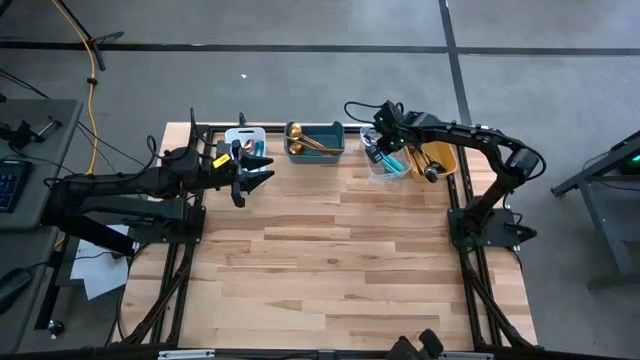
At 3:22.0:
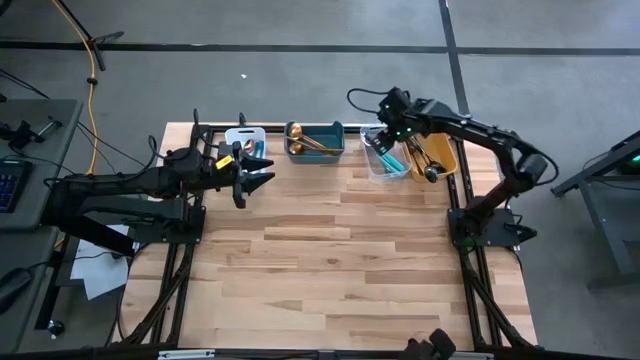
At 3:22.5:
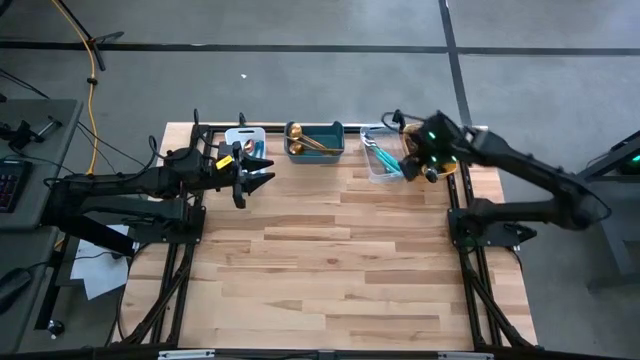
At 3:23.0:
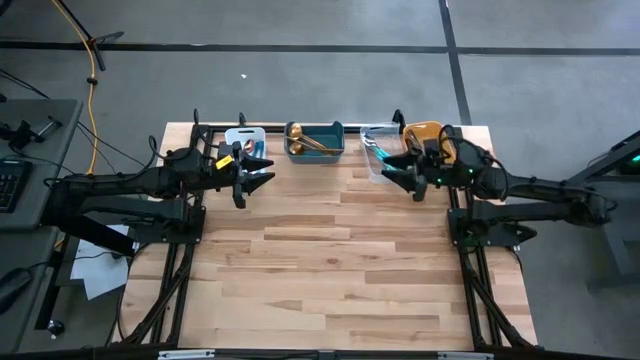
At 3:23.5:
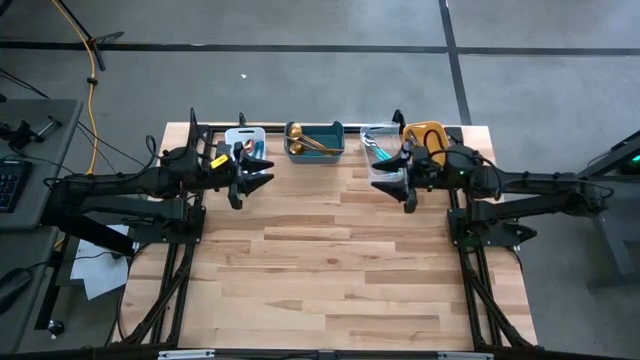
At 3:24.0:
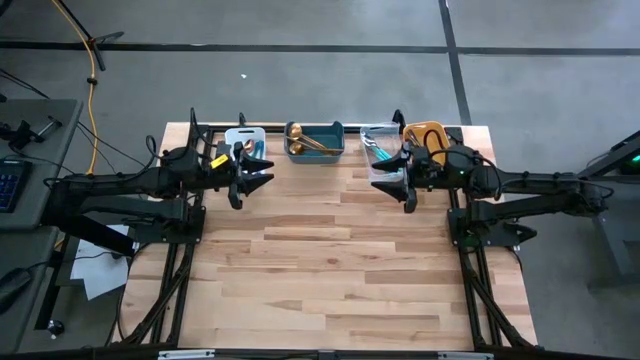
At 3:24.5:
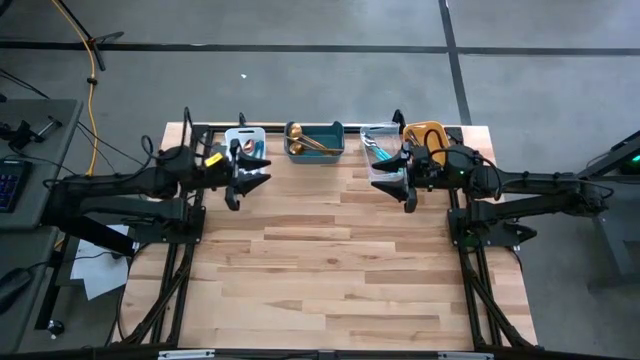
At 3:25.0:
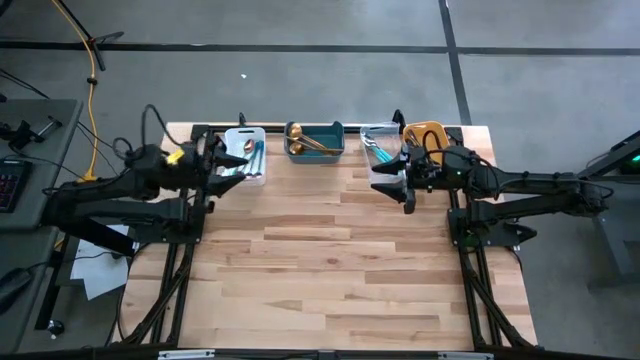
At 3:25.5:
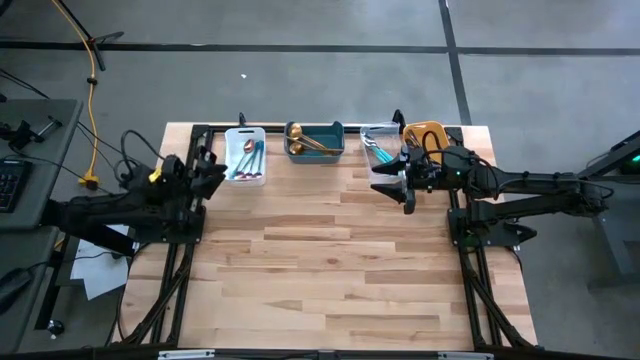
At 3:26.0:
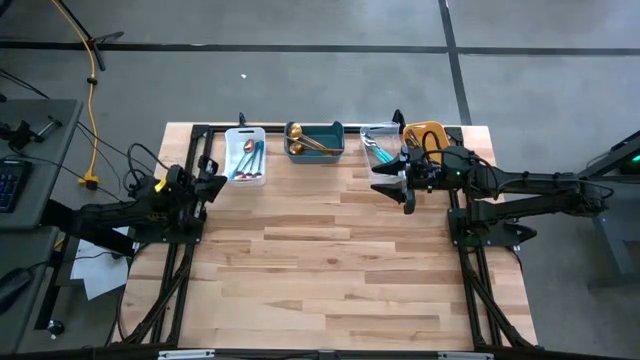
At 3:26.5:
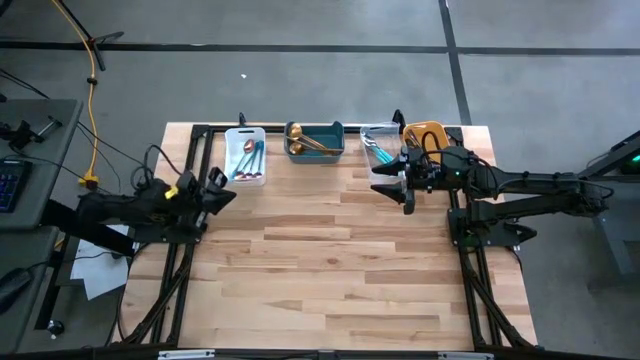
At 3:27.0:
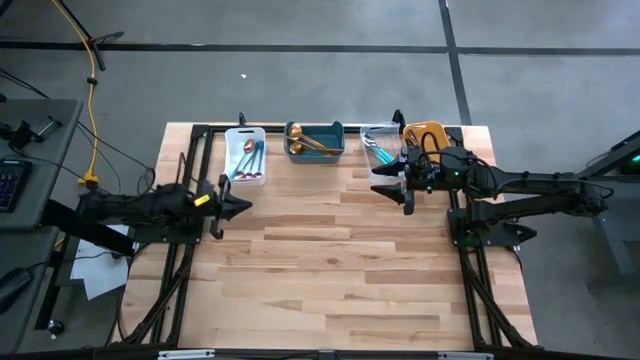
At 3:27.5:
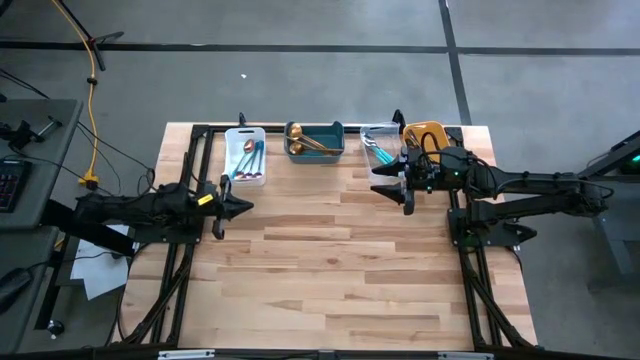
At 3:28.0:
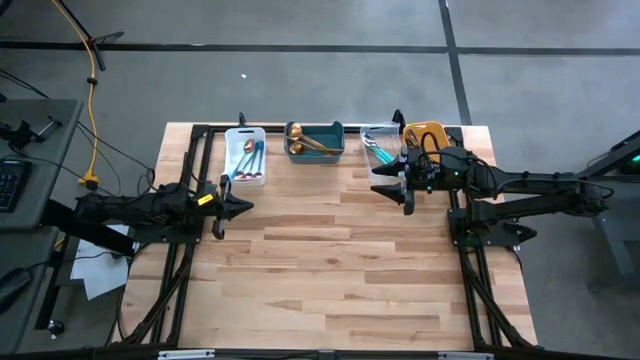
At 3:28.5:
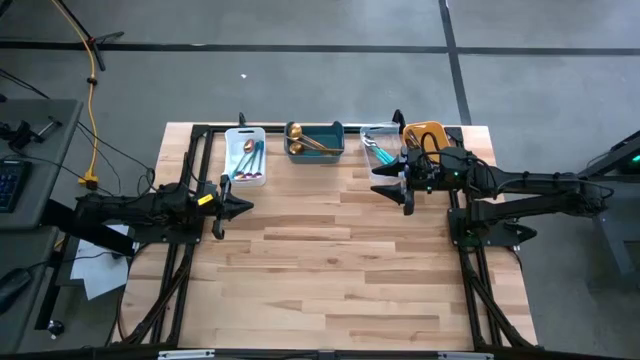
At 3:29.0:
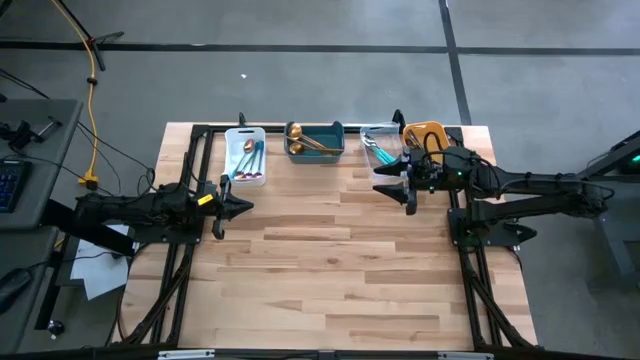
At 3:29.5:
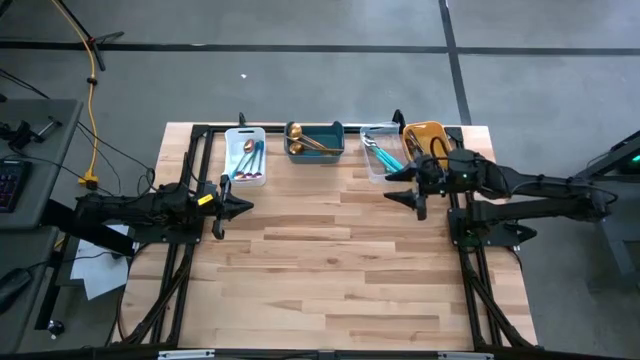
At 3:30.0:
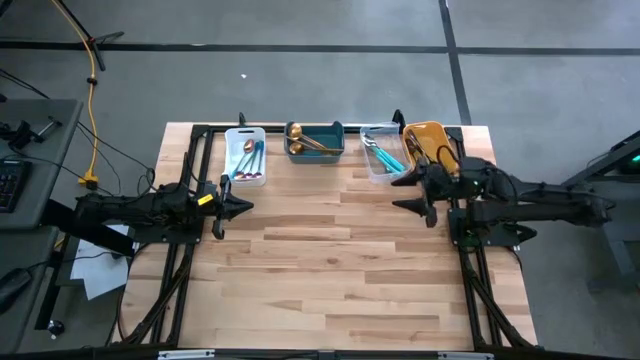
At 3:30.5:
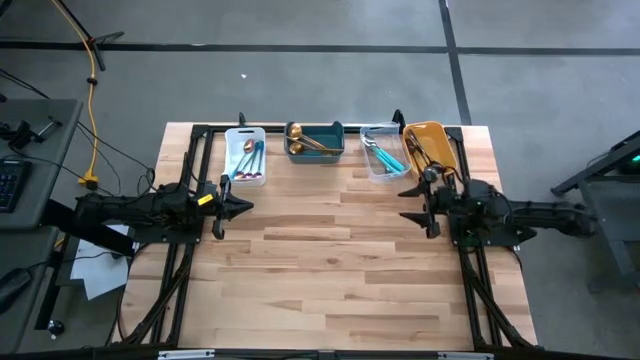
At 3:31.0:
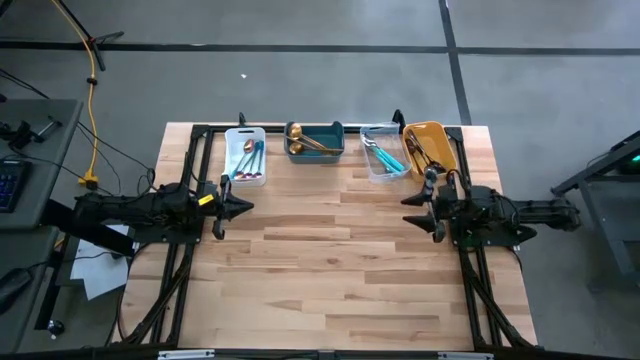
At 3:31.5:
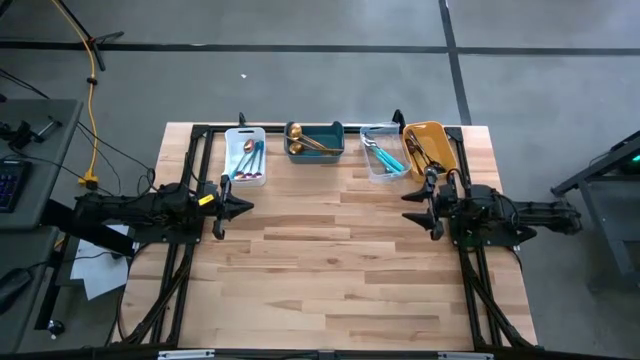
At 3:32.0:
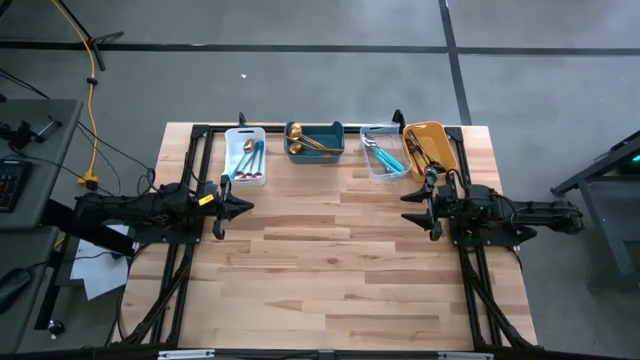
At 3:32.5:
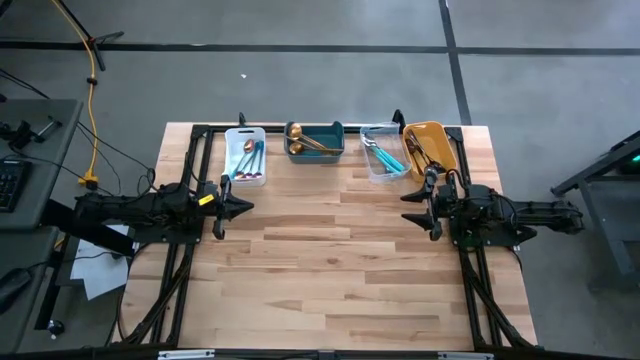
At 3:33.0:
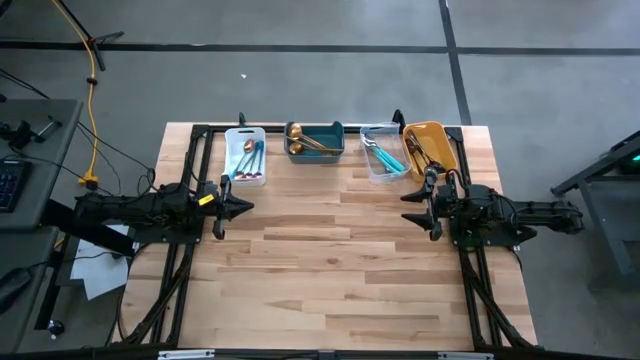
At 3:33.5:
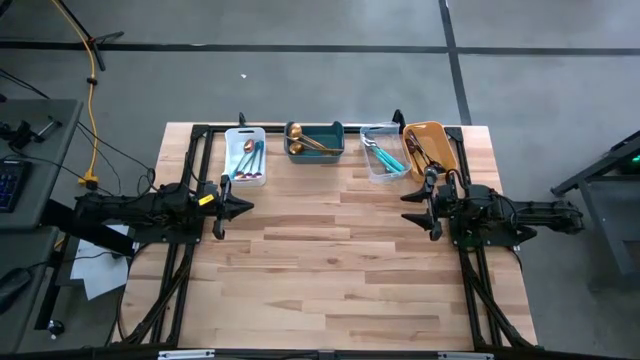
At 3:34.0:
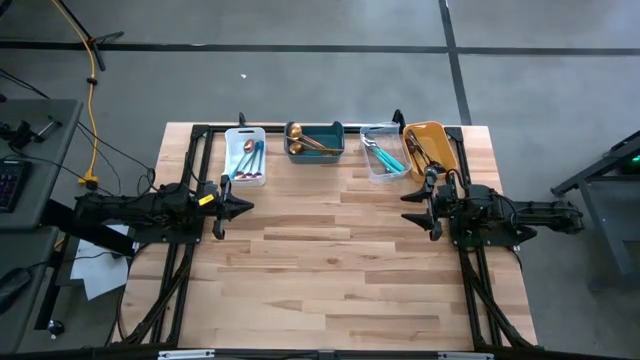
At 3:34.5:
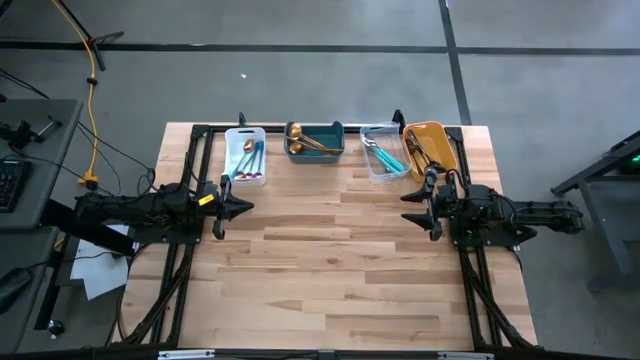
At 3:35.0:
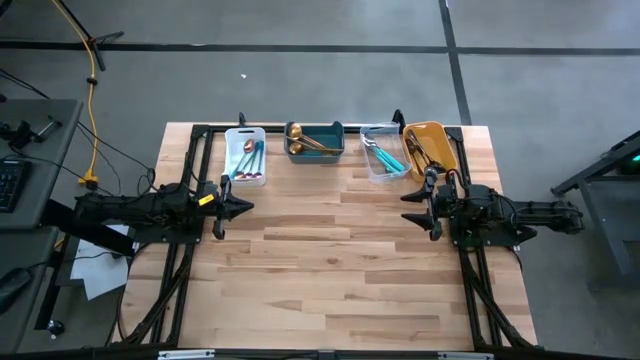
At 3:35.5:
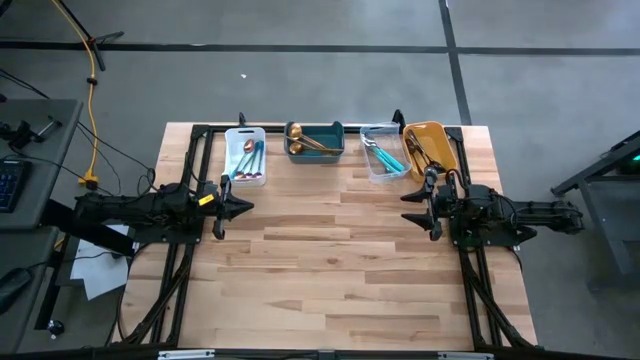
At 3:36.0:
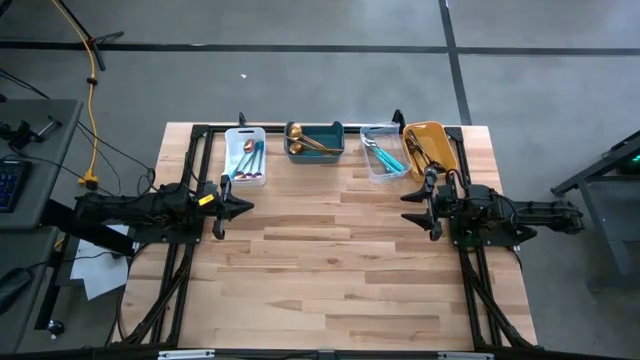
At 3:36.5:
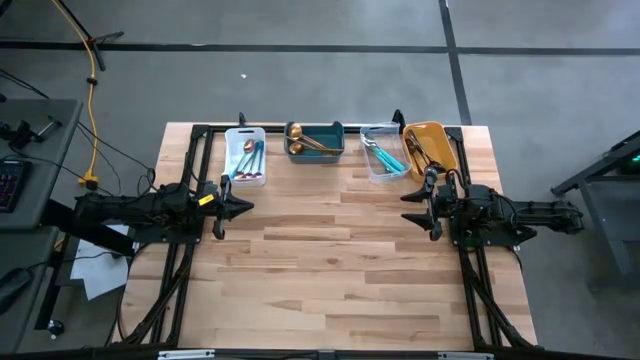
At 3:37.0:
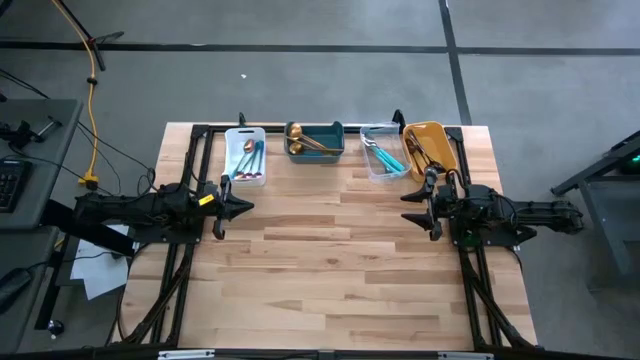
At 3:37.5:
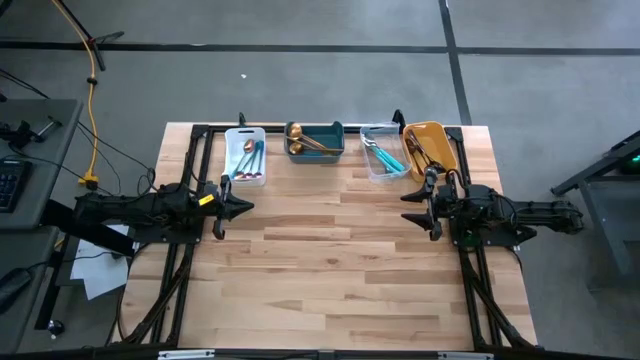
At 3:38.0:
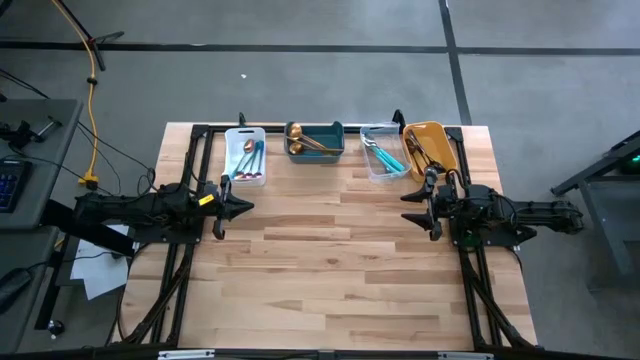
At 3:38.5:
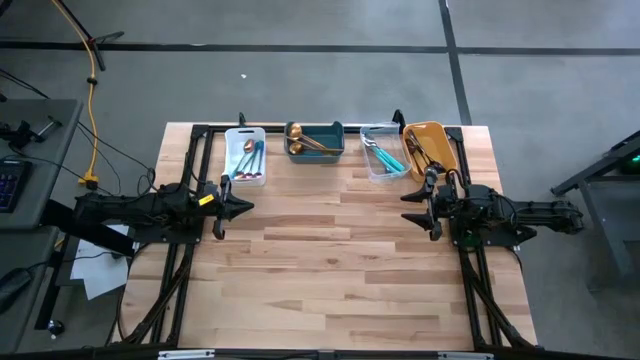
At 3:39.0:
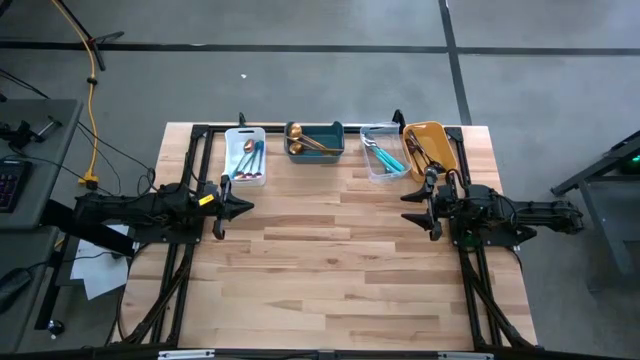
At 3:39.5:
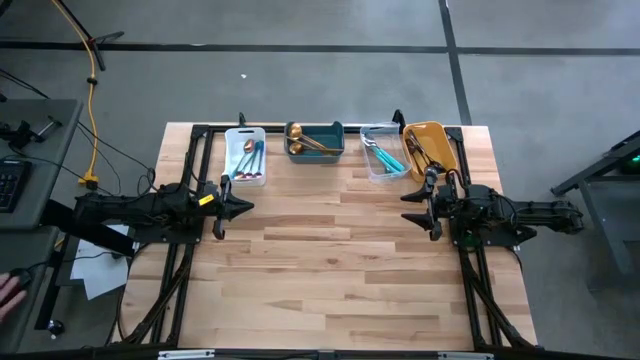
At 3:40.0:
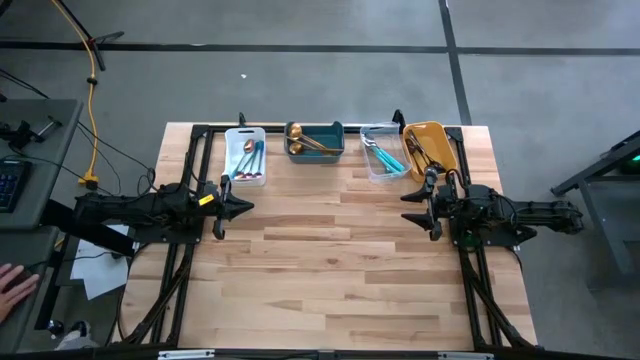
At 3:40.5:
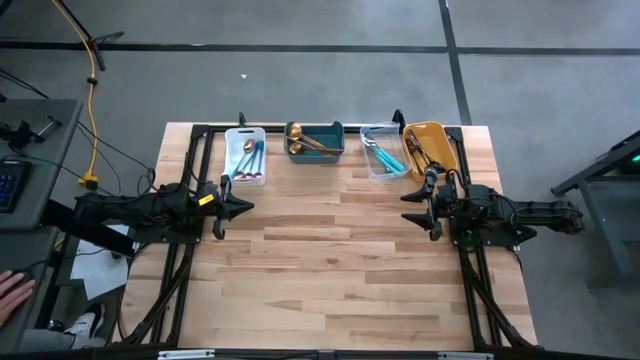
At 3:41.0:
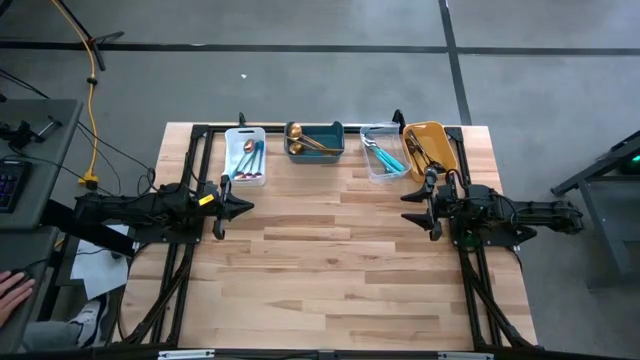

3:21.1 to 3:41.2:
Task: Sort silverware by color (type)
Return to Home Position

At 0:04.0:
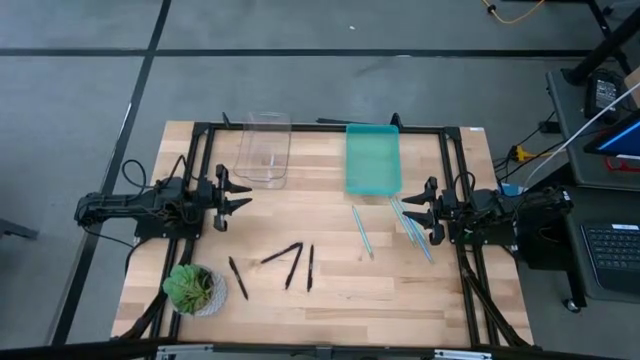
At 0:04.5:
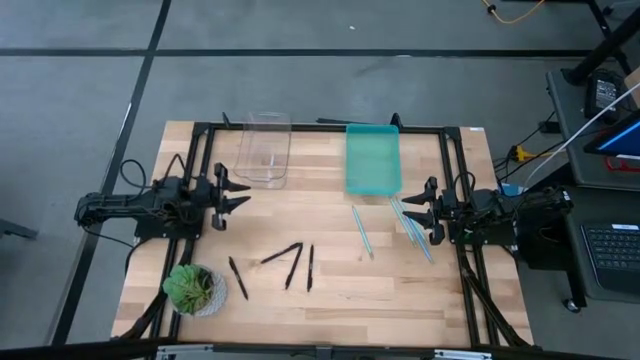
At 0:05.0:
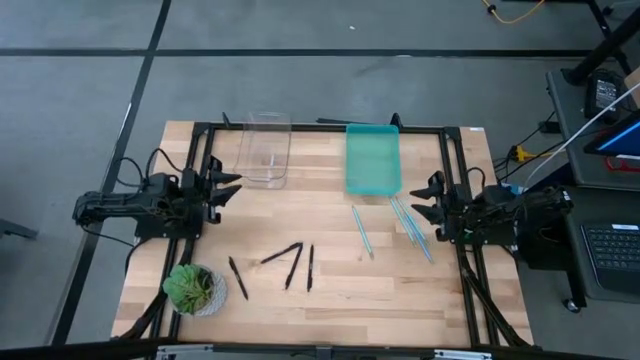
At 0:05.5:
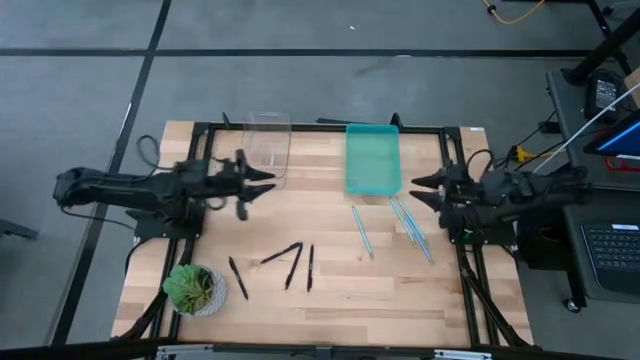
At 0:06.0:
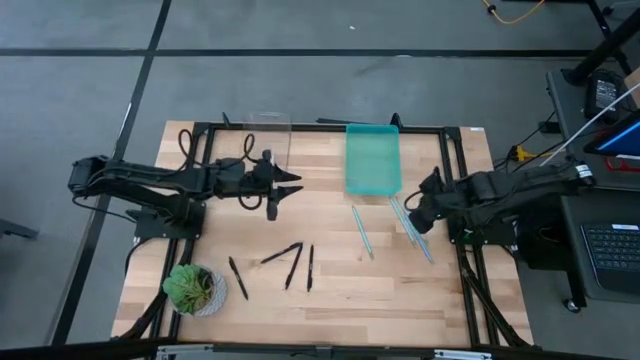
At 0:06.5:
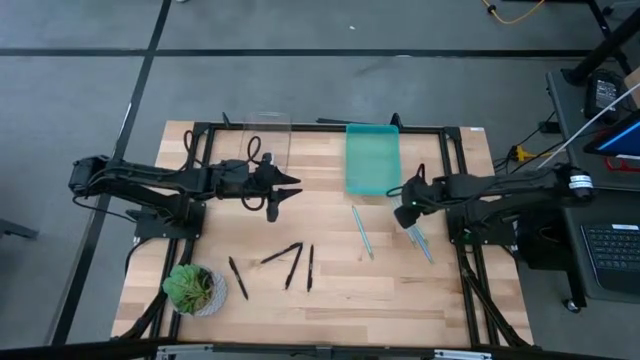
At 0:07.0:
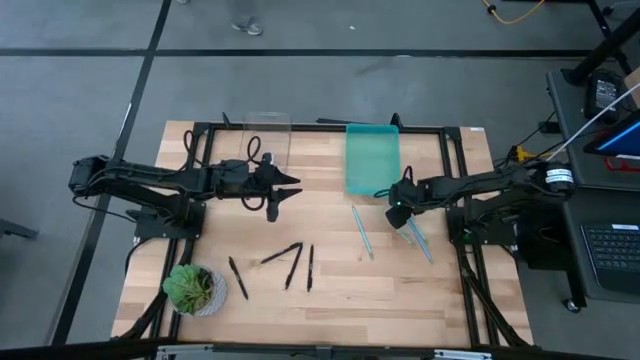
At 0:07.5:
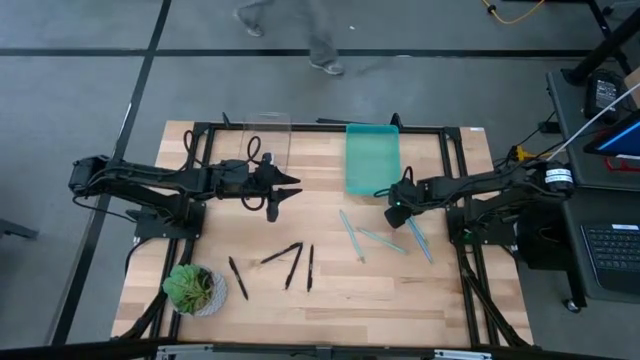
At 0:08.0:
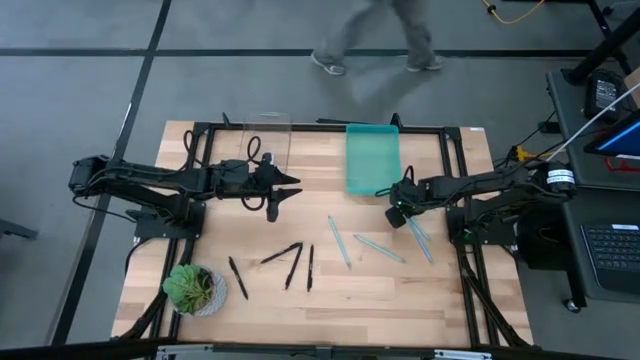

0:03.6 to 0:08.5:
Task: Sort pens & pencils
Put the blue pencil into the blue bin
